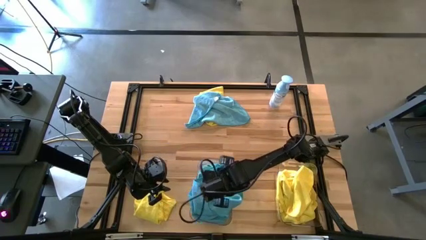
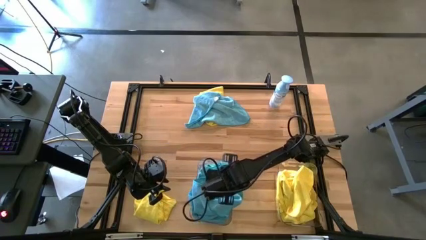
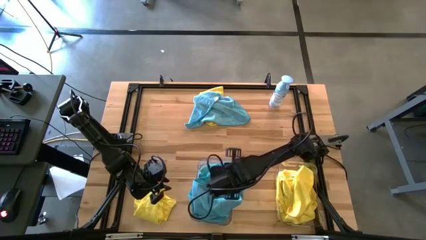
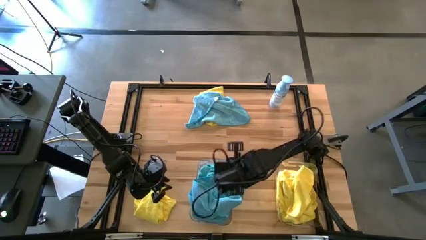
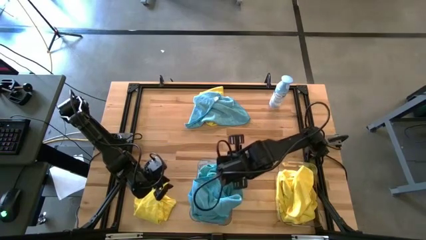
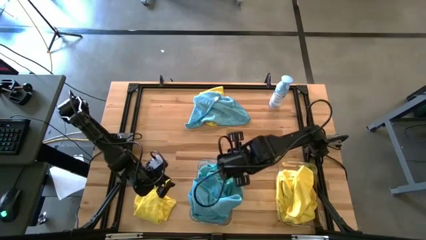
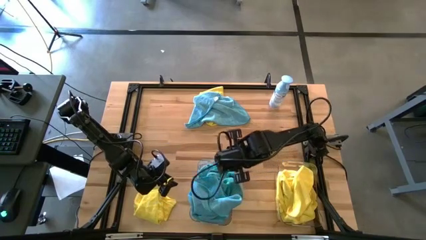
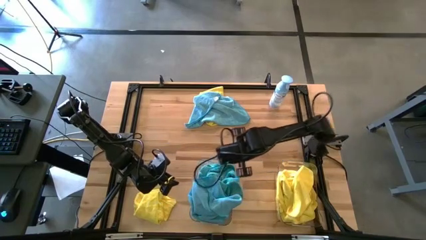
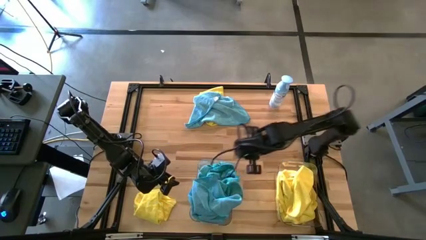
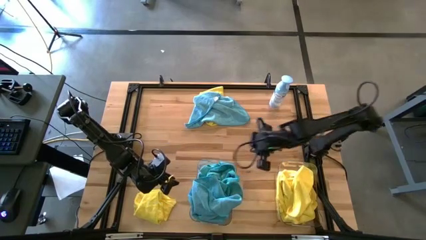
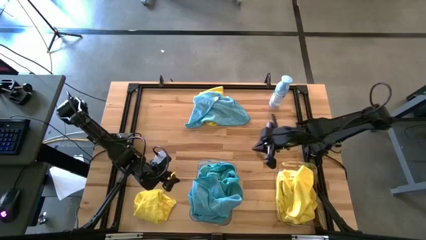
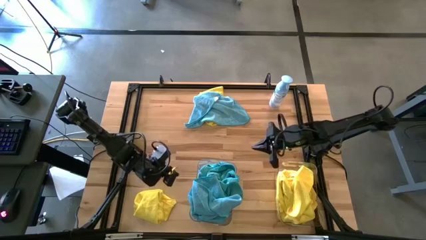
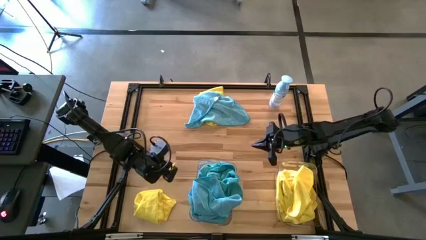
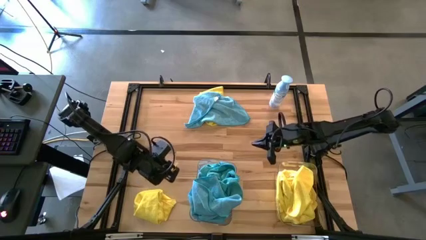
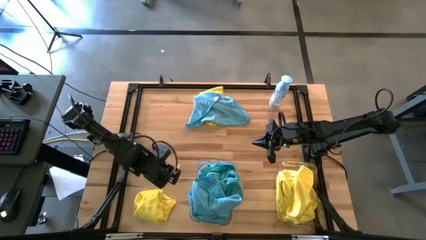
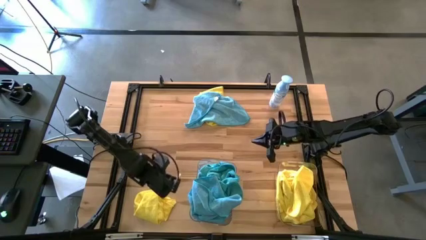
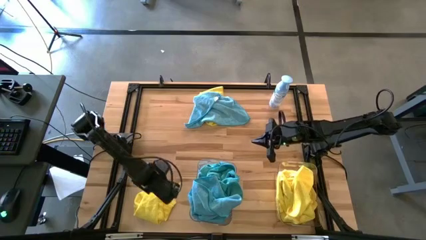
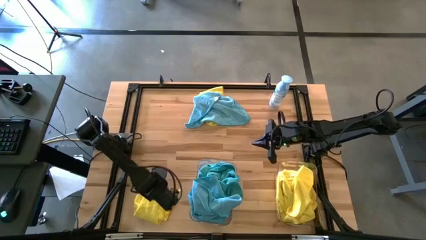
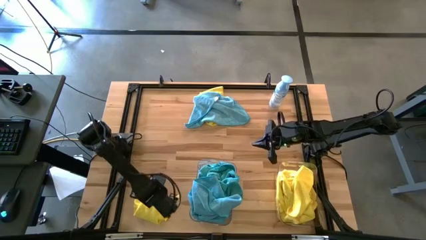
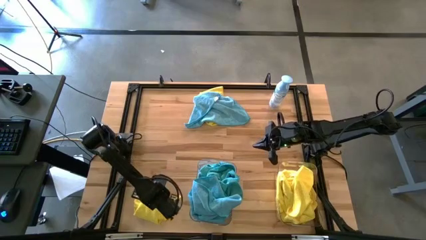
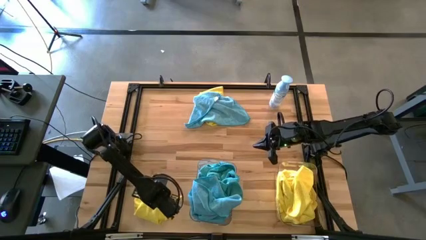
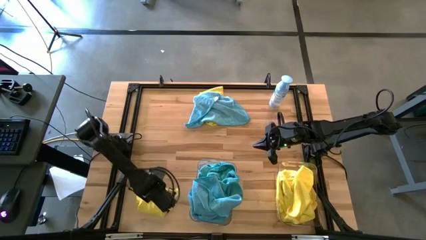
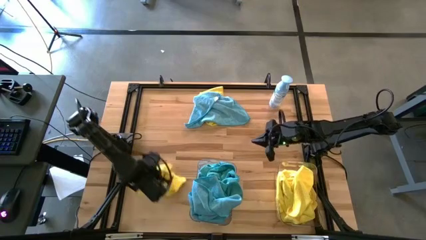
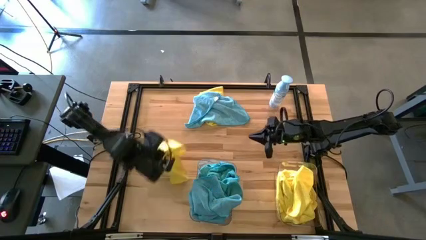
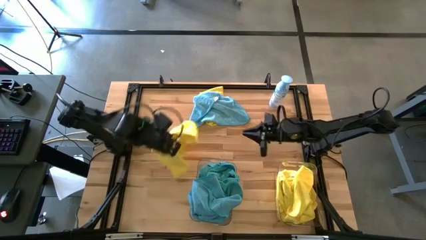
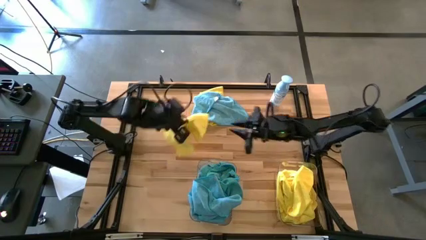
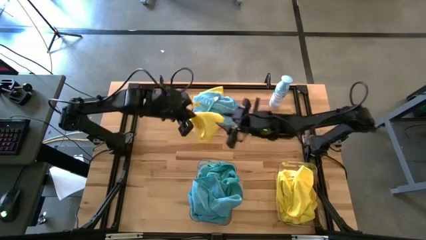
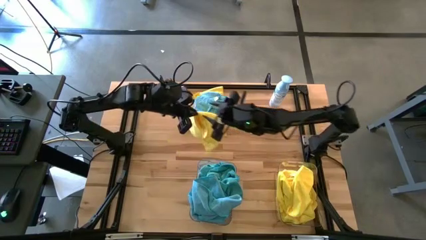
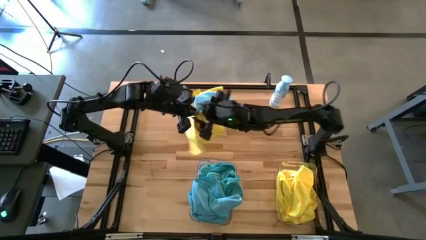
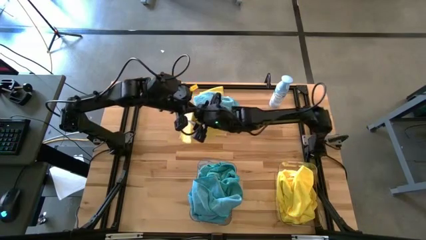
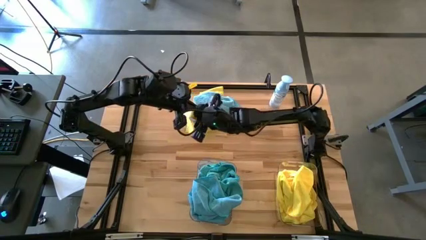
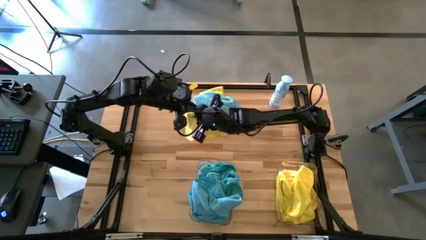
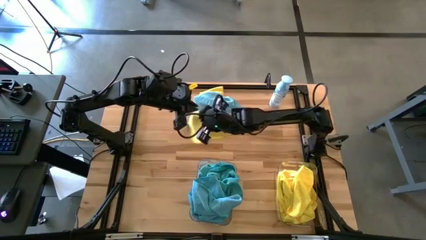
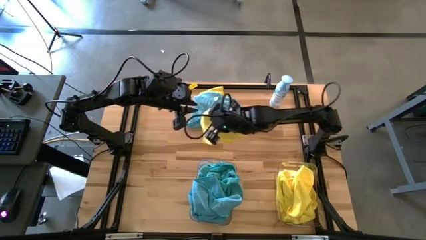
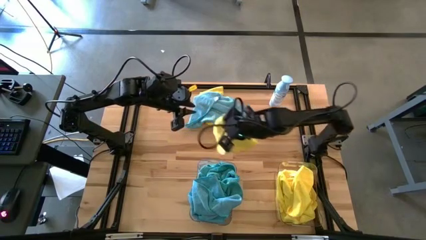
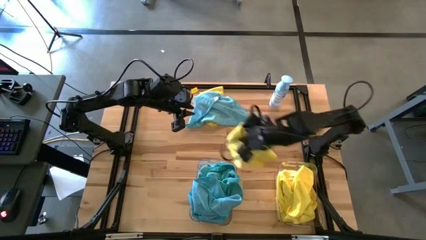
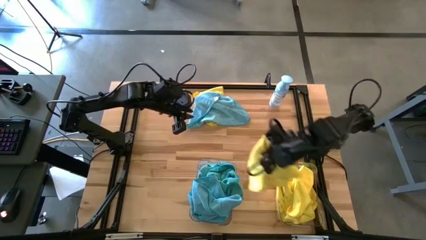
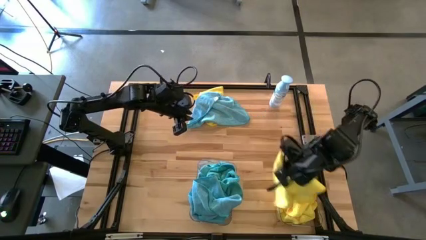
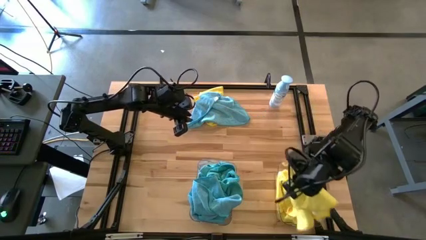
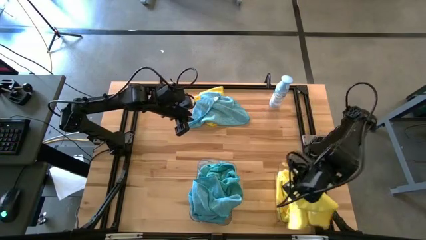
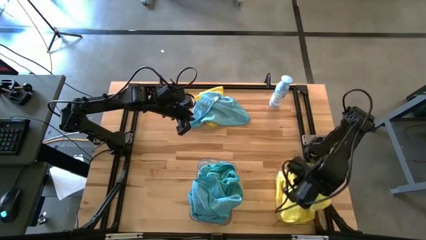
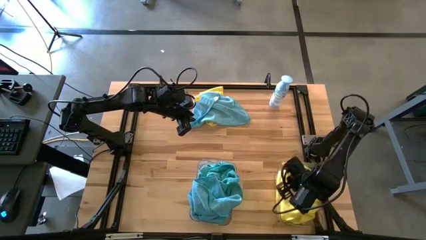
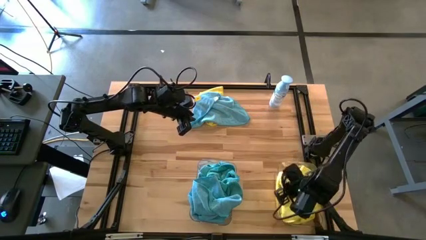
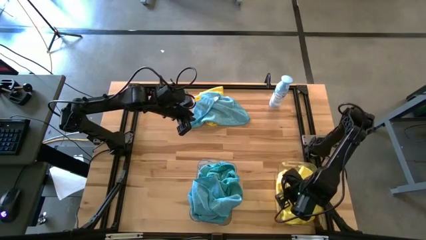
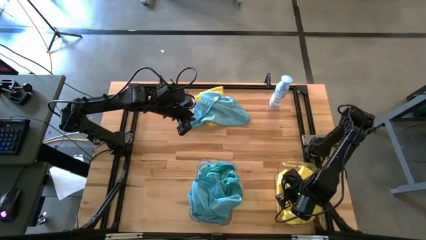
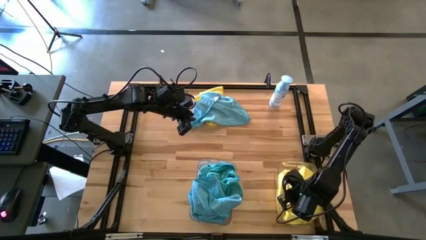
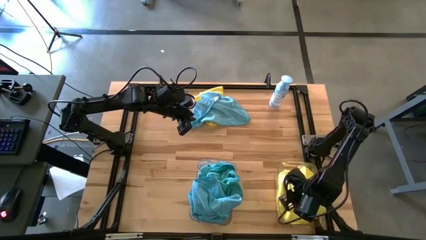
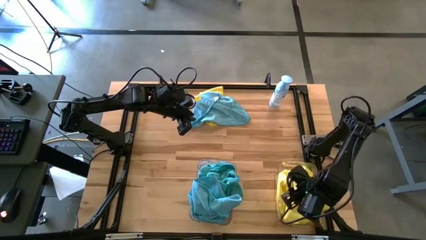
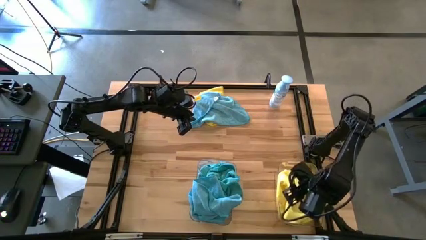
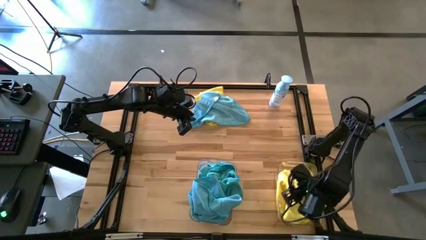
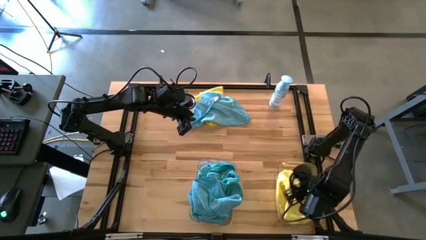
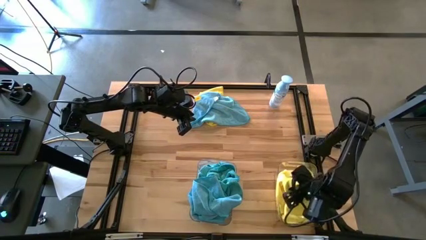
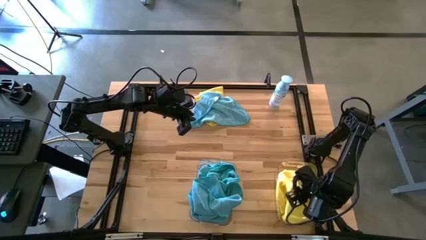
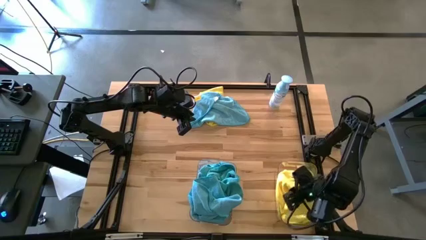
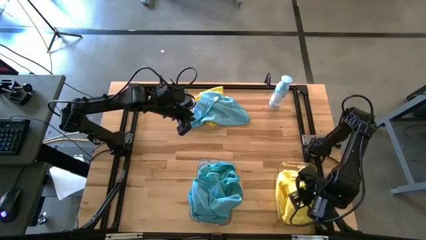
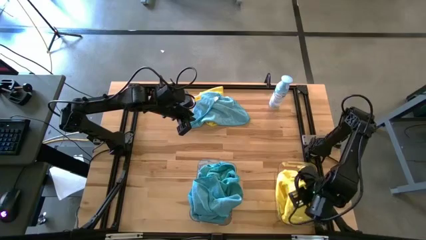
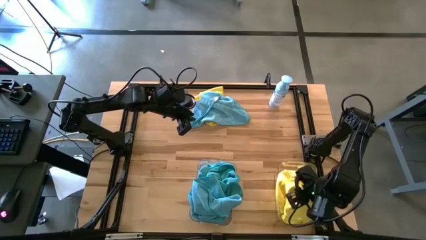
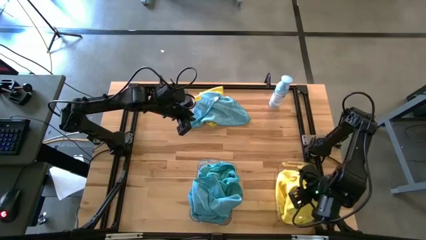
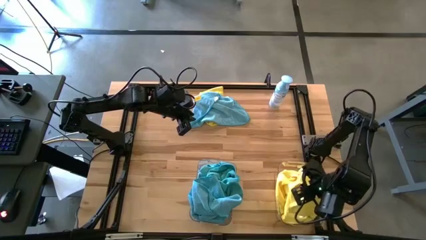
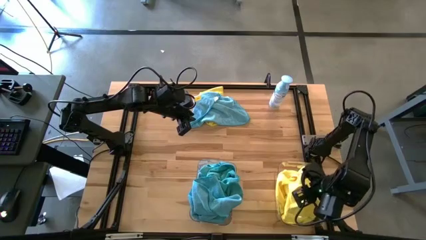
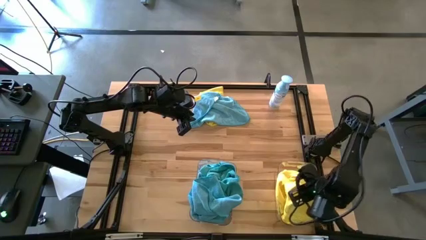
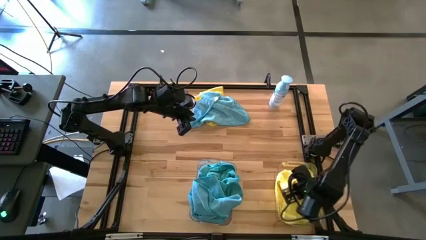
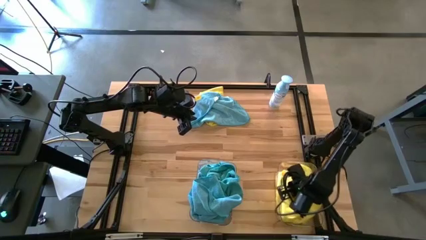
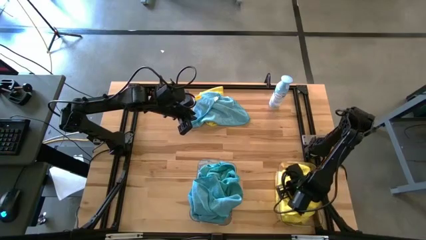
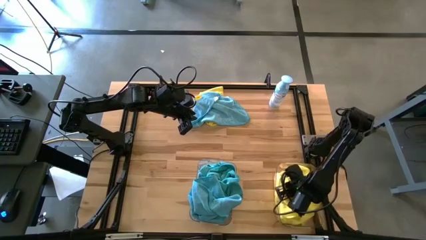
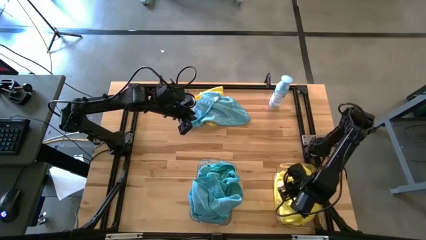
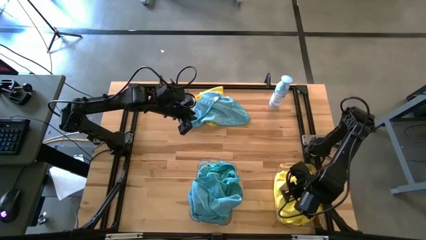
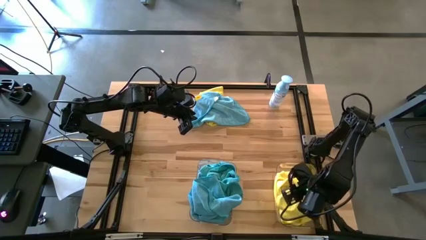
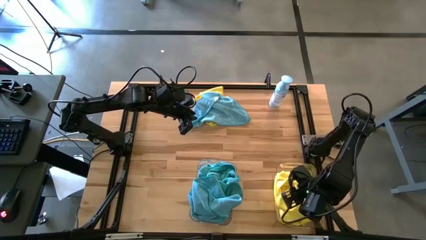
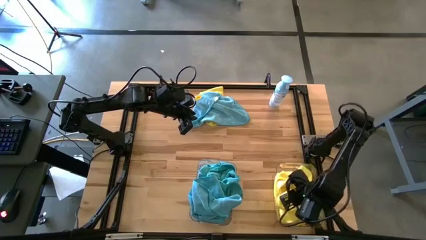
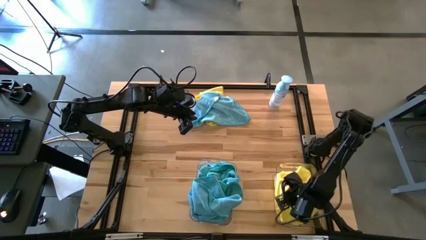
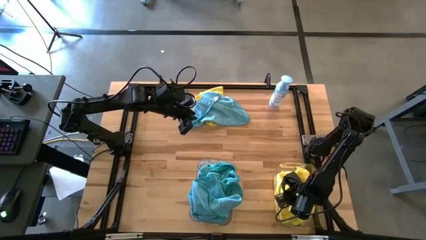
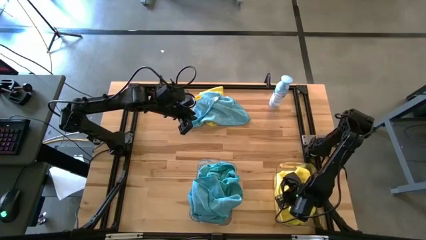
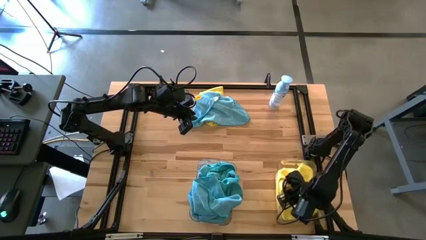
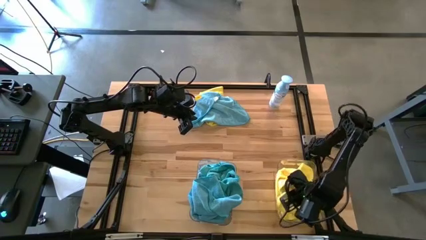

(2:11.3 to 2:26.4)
Task: Sort microfiber towel by color & place in baskets
Put the yellow towel into the right transparent bin
